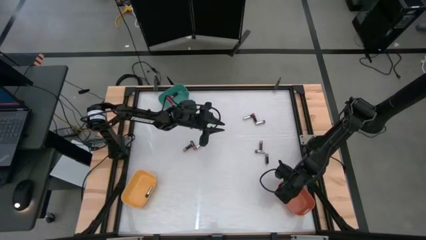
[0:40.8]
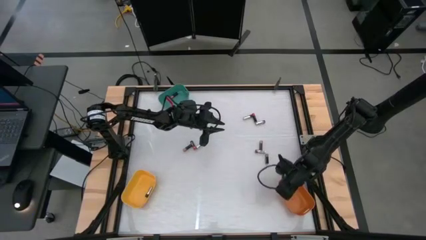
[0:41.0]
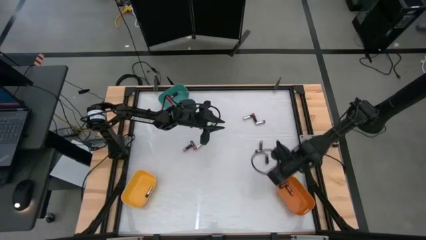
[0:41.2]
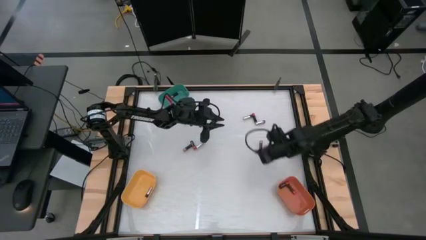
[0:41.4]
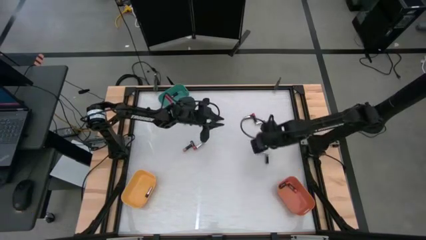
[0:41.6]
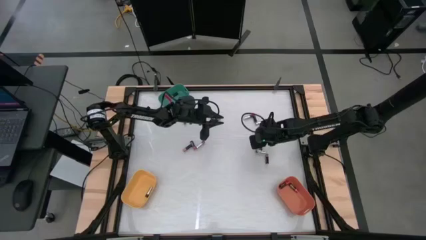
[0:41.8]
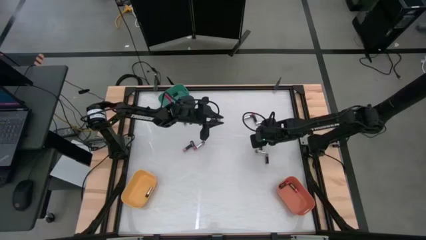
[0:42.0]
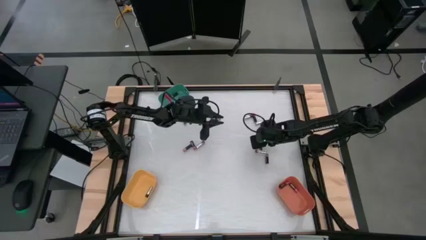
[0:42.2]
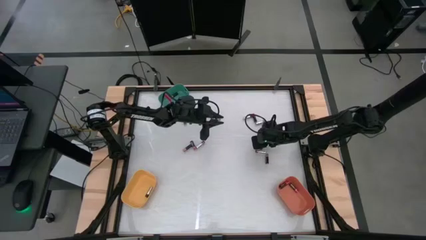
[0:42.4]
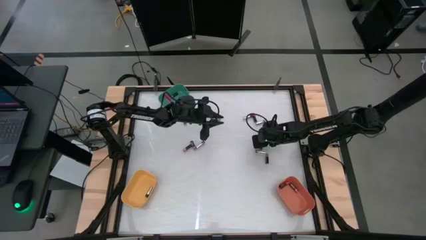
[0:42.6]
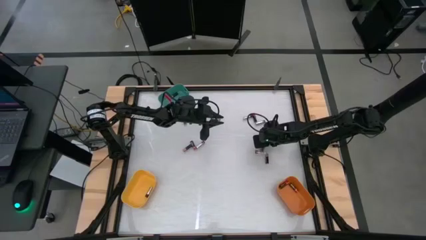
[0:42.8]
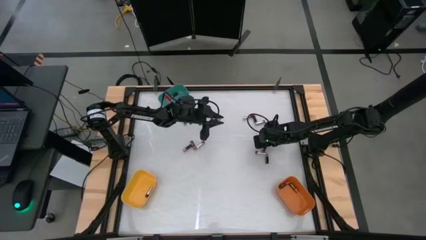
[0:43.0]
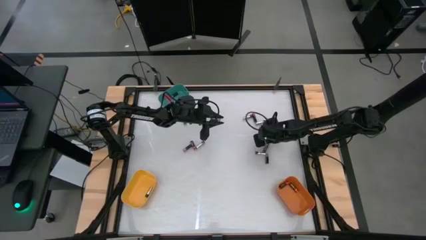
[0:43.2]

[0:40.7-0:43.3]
Task: Sort batteries
Put the brown battery into the green bin

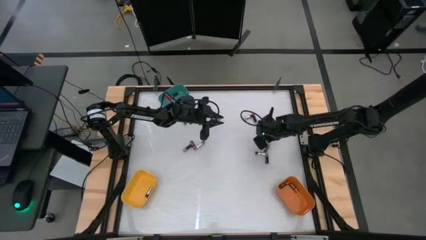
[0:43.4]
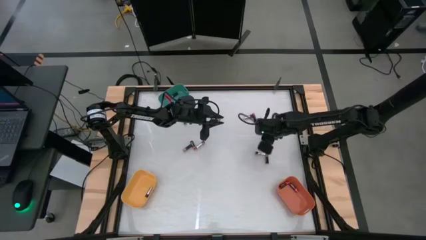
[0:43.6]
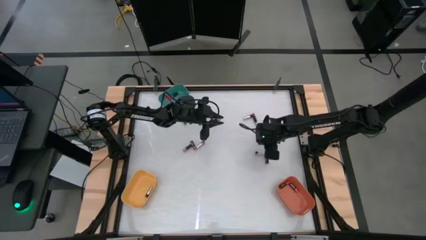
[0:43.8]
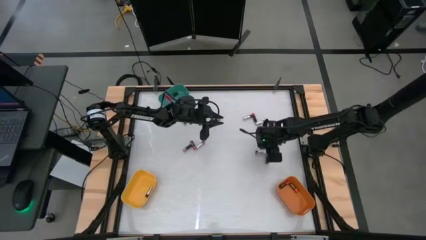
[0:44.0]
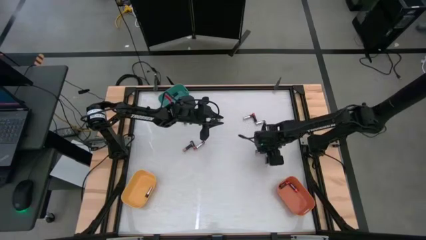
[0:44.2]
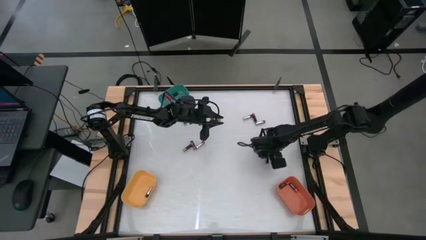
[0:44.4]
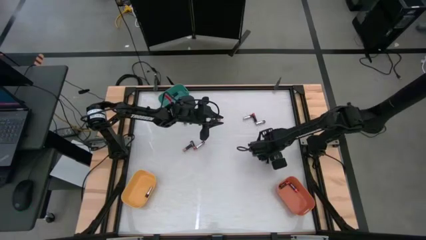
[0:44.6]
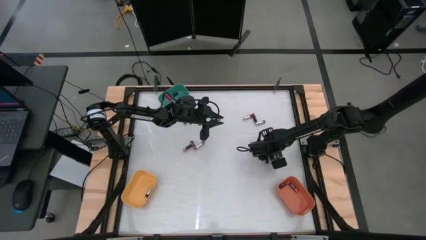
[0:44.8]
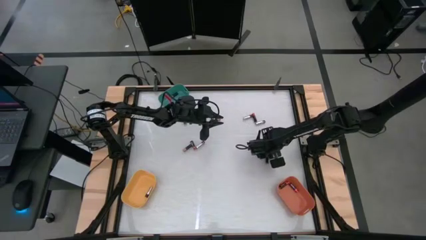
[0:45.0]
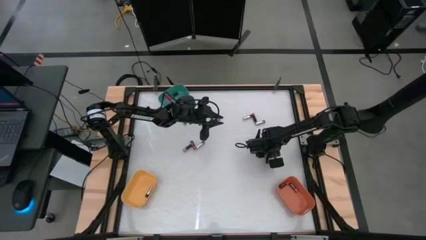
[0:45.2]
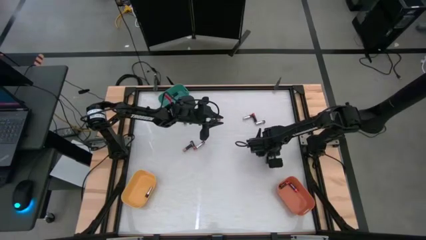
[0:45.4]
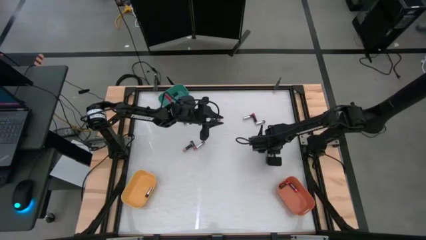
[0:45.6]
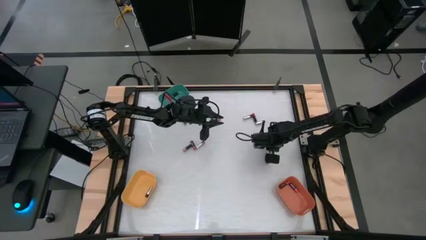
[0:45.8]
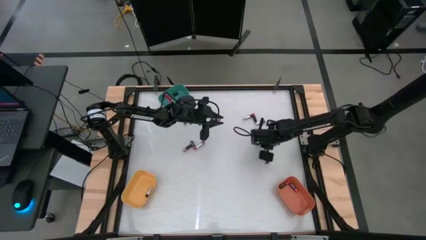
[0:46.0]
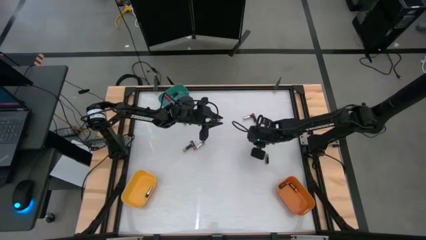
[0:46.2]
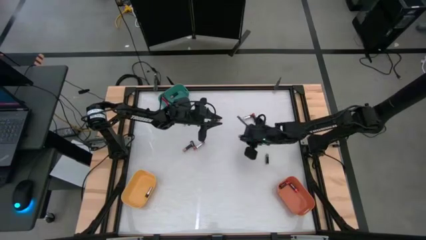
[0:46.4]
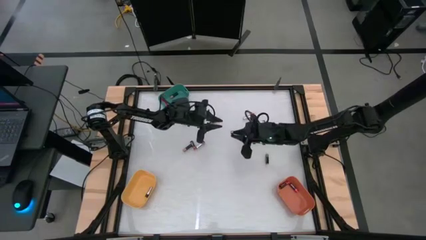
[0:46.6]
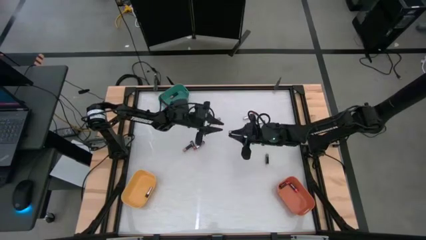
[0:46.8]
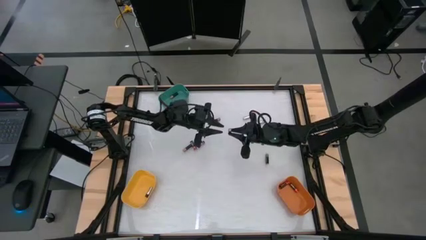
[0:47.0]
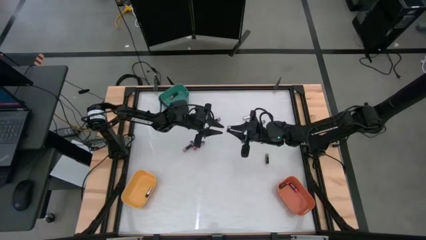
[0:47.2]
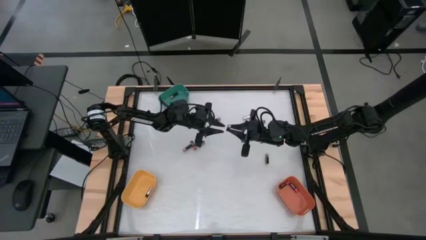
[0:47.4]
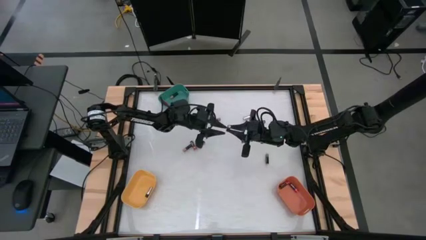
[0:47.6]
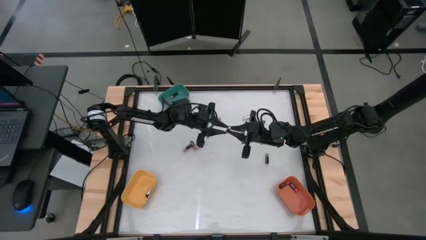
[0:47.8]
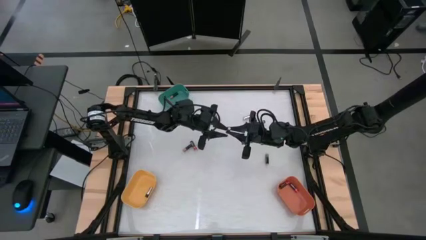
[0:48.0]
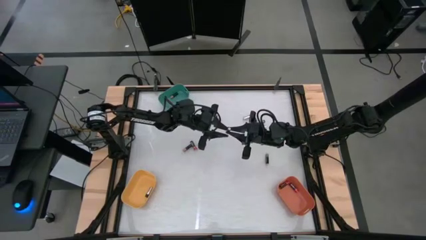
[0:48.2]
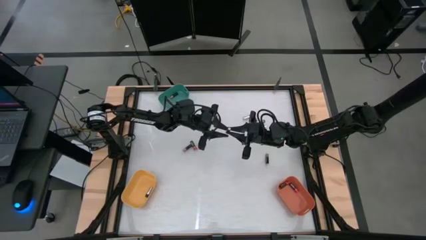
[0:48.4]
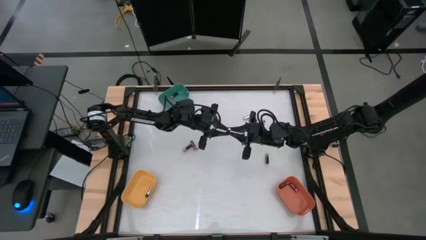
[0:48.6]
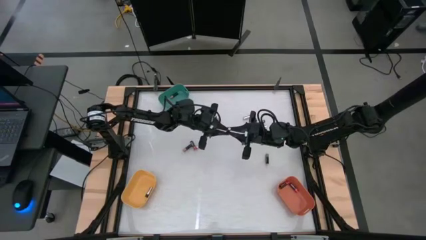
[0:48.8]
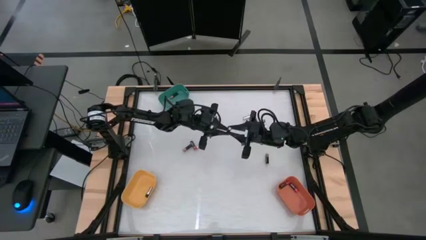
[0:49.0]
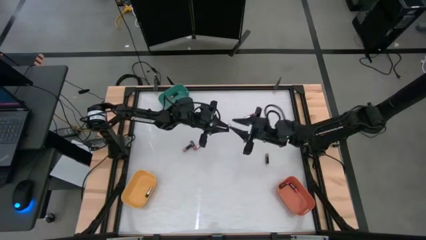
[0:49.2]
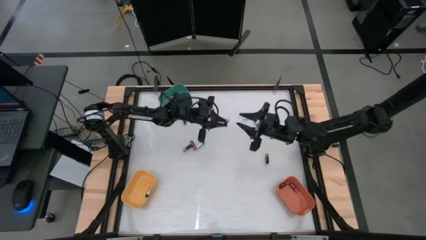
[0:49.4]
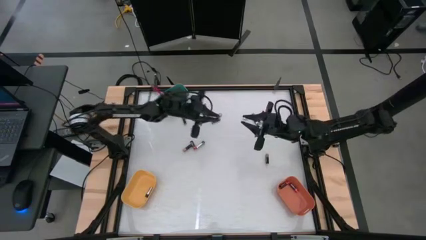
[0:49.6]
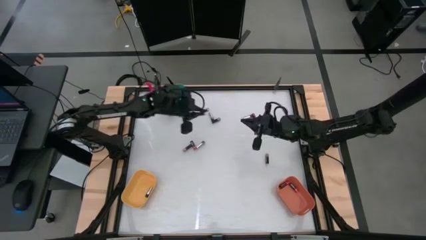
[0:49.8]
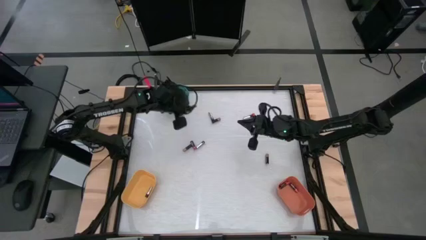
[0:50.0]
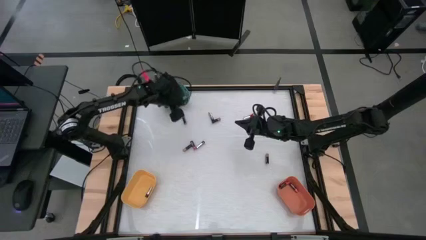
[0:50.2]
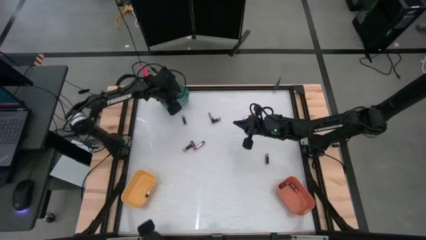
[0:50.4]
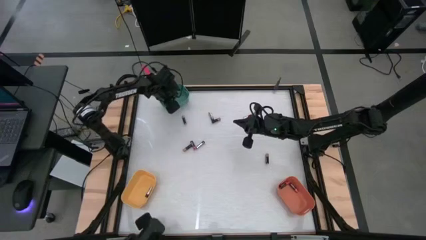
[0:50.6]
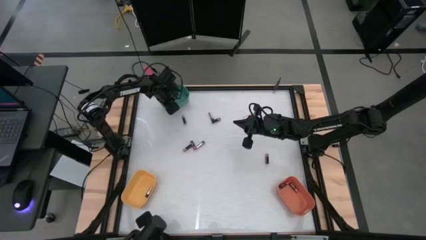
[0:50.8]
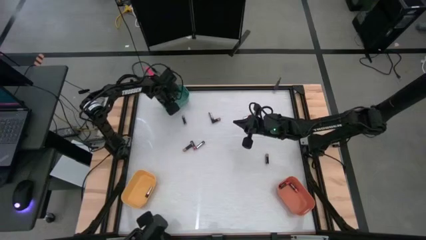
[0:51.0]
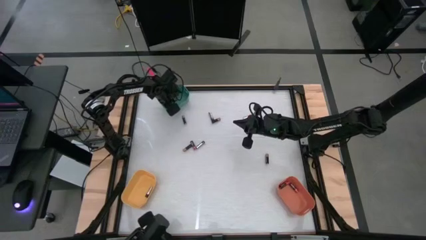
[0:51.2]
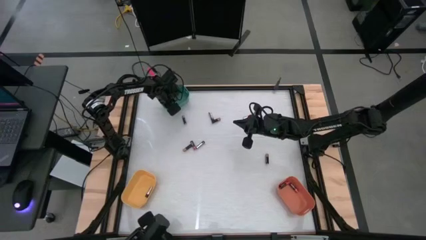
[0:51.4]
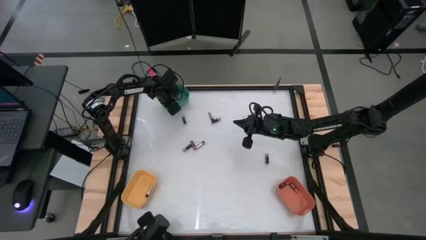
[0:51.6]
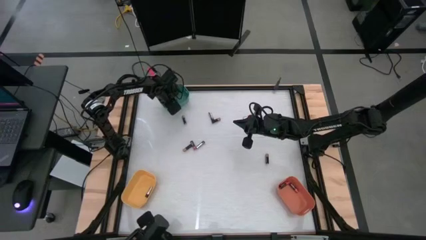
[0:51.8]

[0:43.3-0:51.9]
Put the brown battery into the green bin
